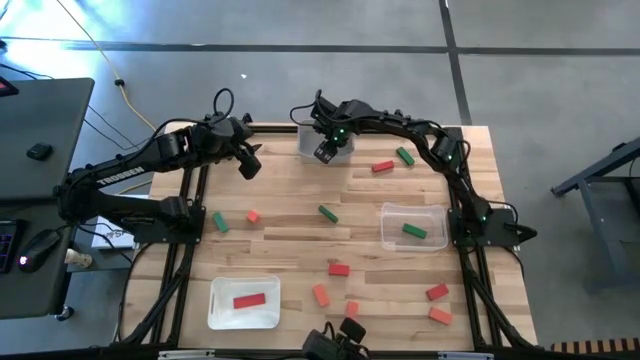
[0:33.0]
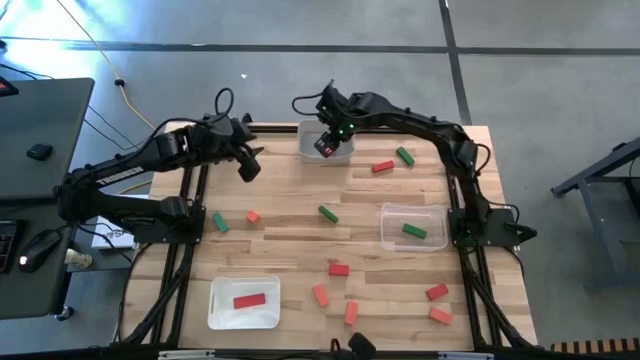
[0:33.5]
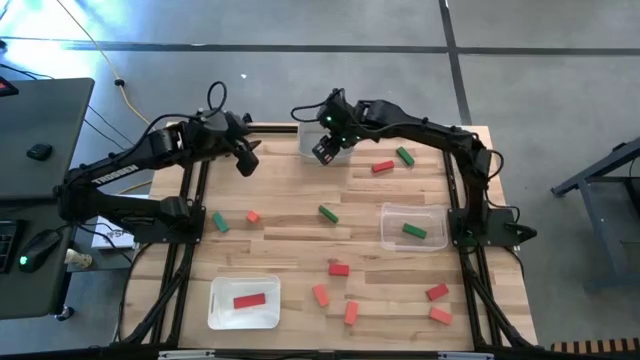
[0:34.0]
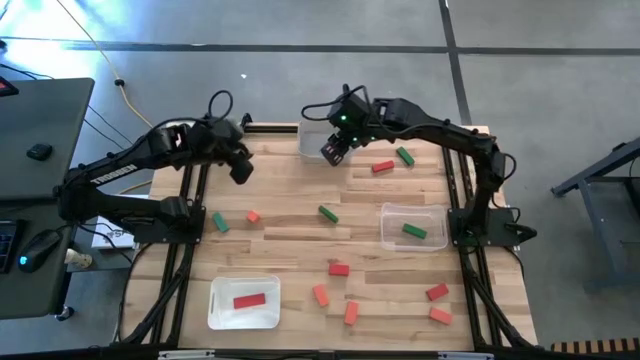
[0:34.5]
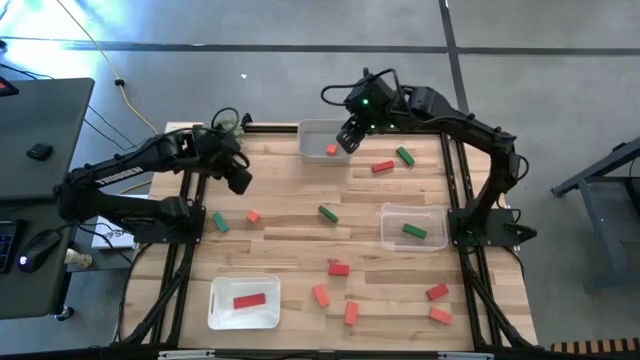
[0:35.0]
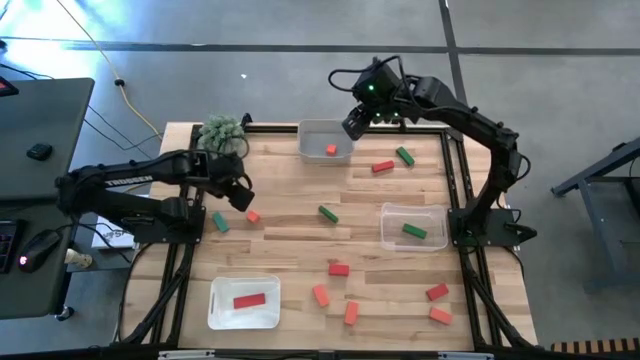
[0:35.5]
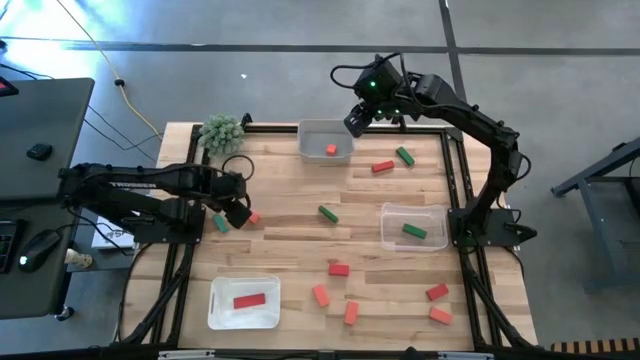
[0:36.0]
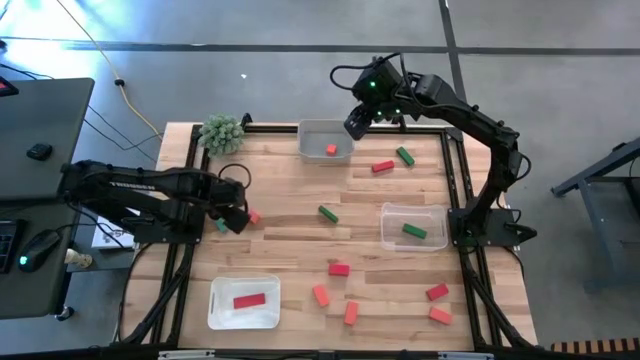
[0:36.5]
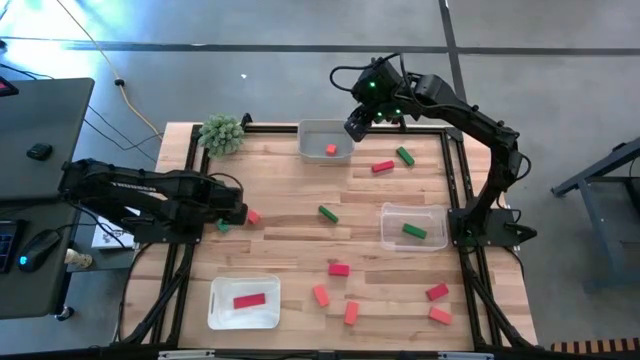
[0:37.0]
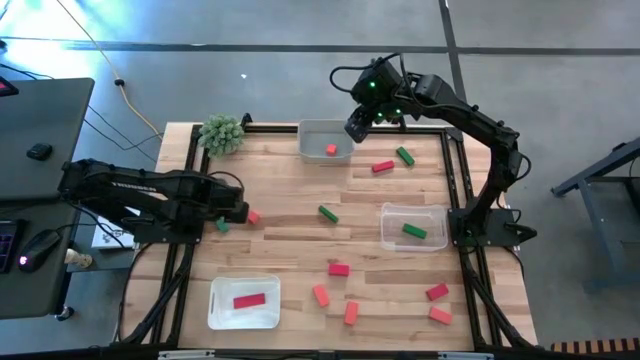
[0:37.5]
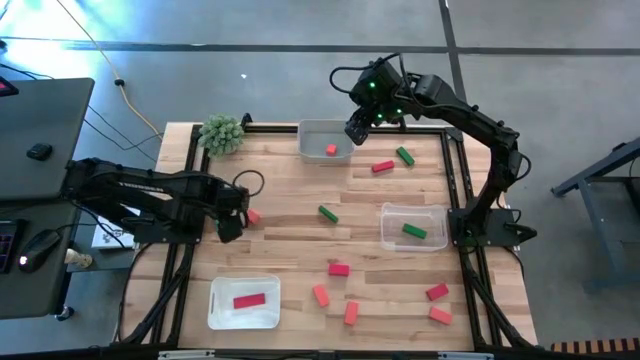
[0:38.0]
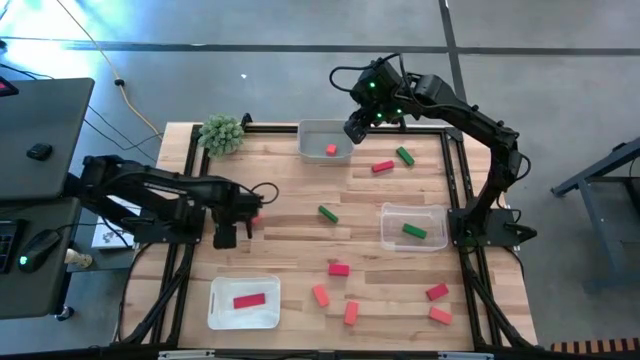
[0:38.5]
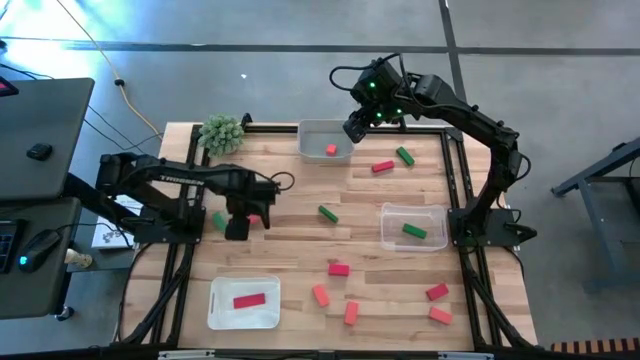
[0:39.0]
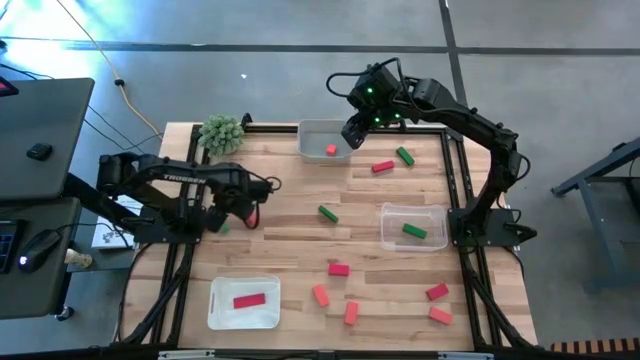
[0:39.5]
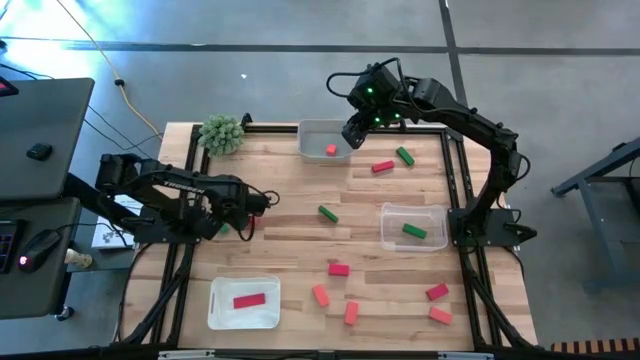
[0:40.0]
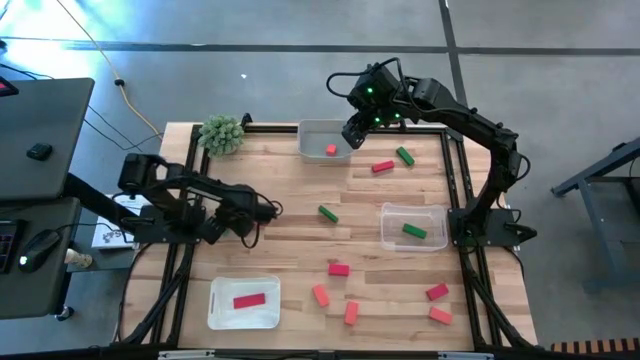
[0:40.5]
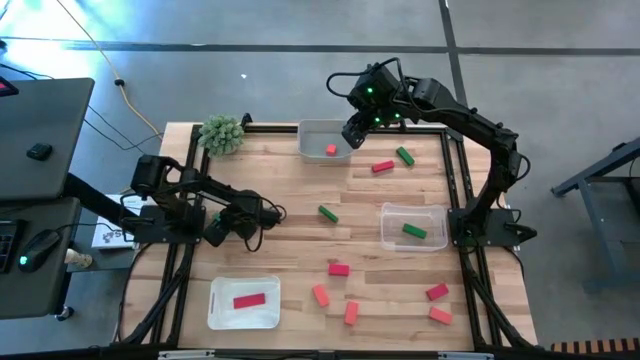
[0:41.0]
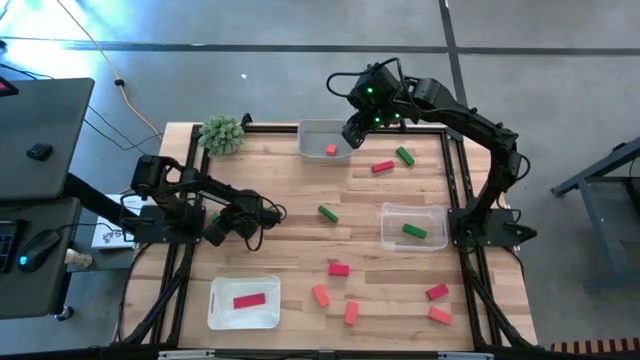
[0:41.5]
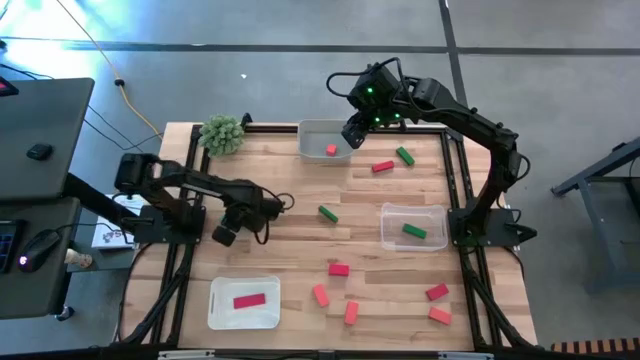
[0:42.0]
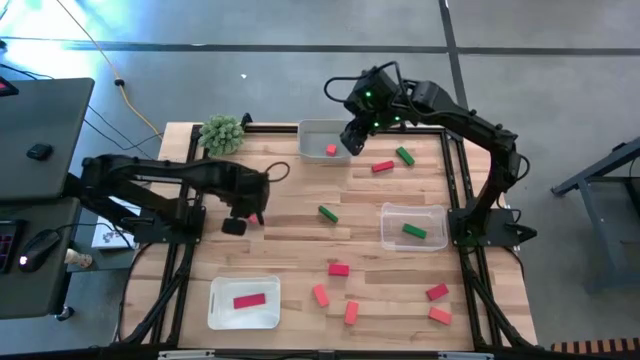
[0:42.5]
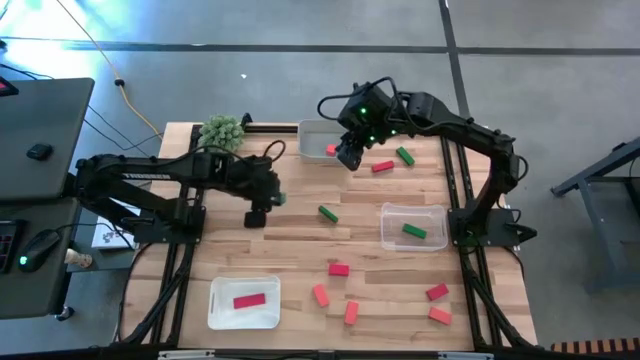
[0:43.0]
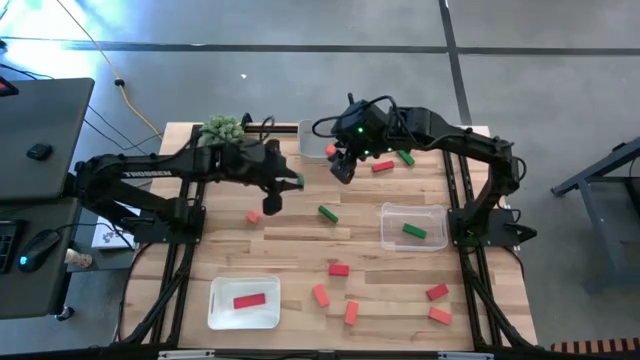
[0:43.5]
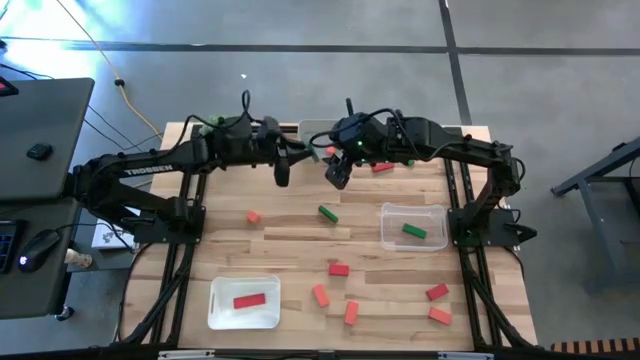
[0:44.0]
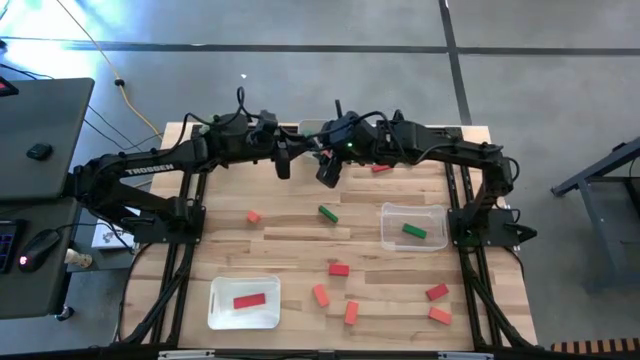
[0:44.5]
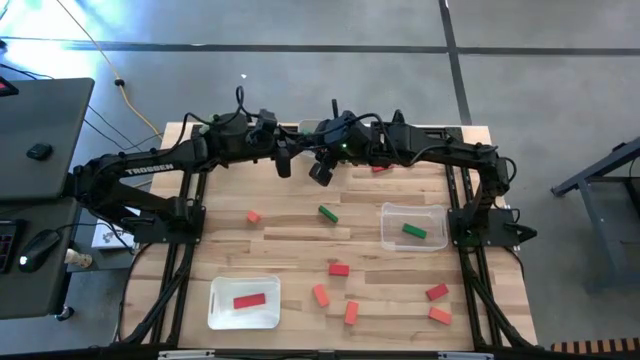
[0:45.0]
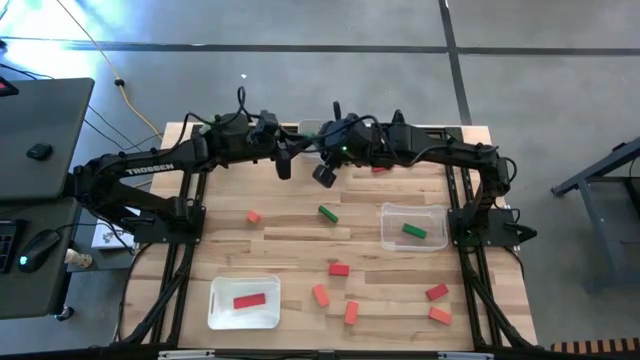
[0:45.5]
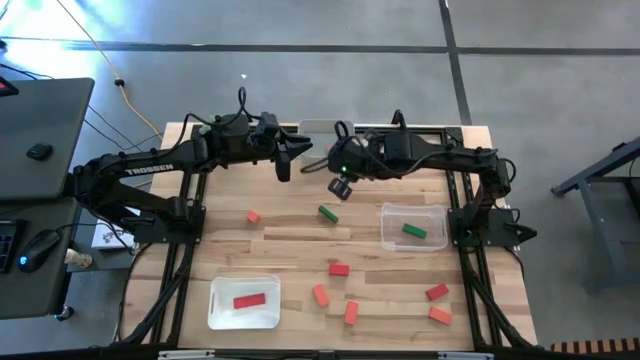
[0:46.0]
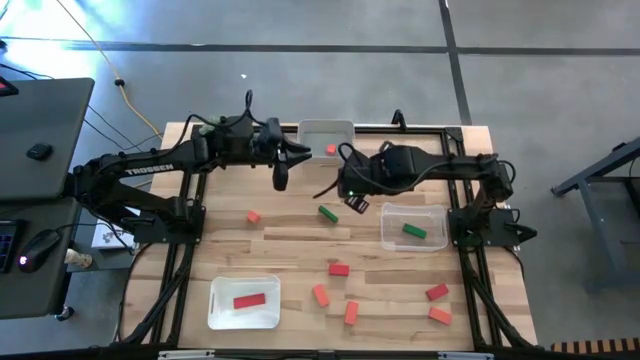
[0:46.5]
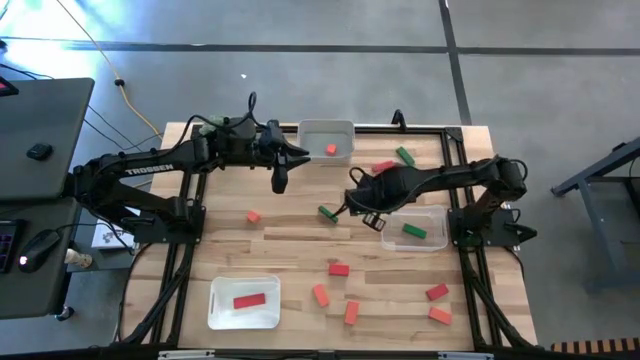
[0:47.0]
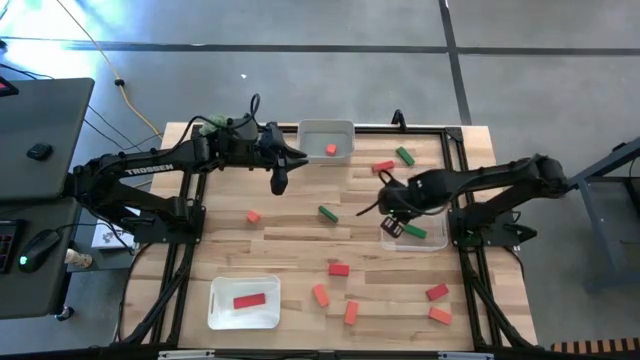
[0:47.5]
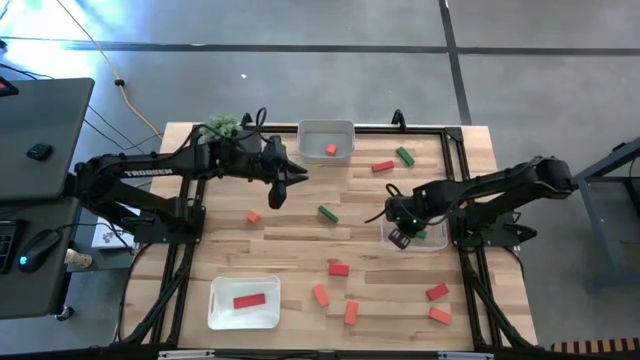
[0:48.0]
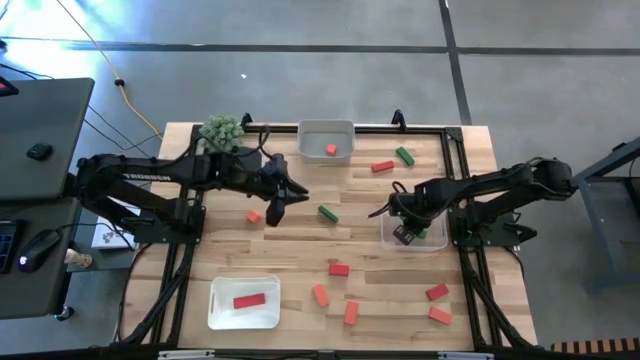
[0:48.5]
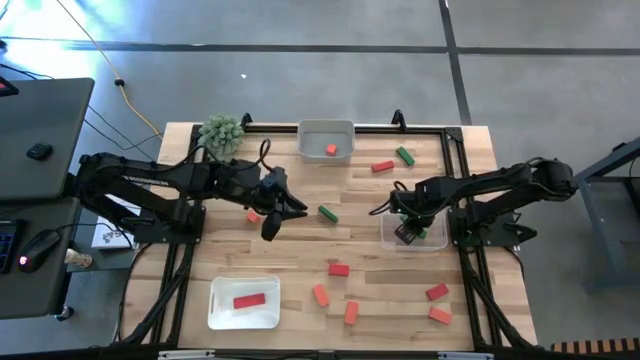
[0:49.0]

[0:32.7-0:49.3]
Task: Sort & place blocks by color
Put the light green wooden block into the transparent bin

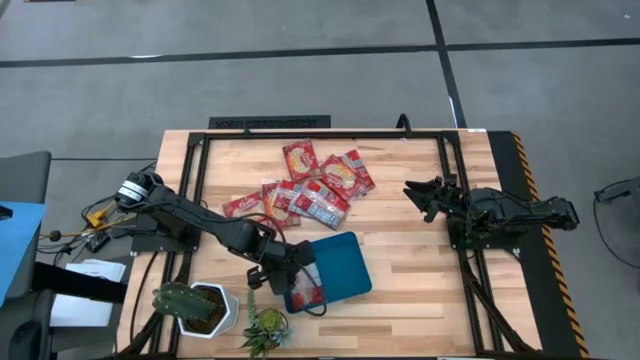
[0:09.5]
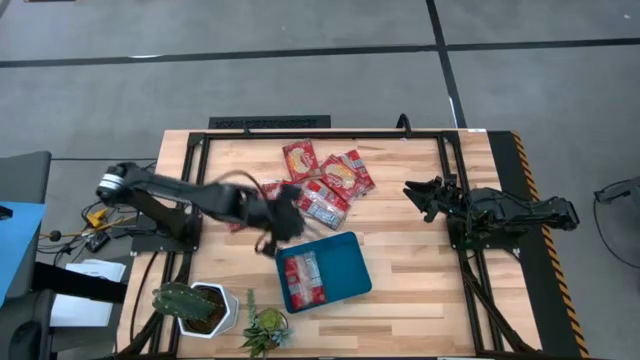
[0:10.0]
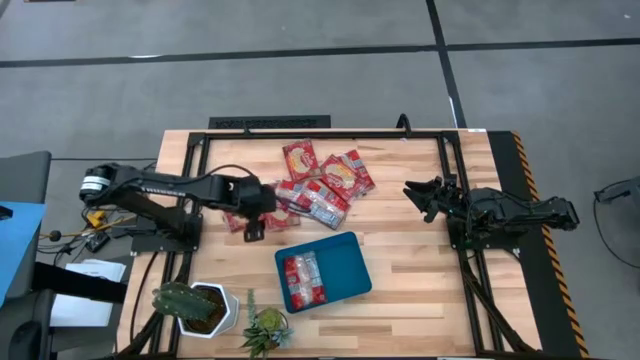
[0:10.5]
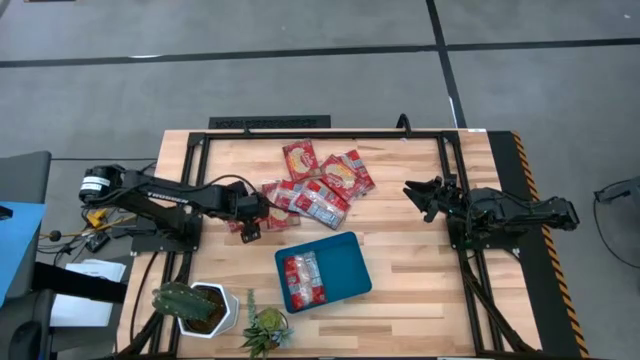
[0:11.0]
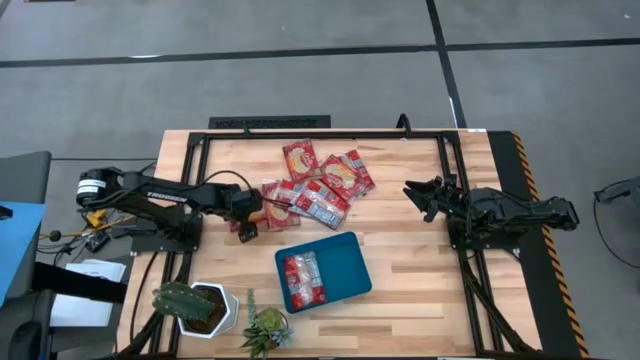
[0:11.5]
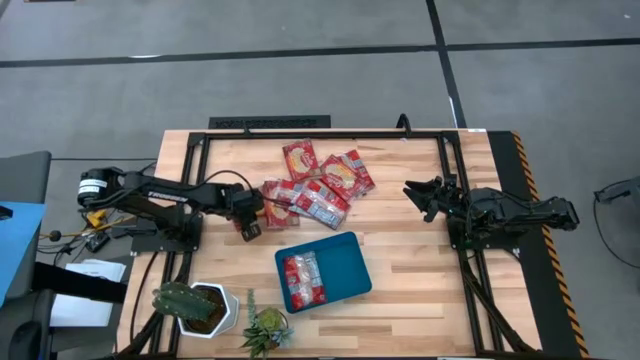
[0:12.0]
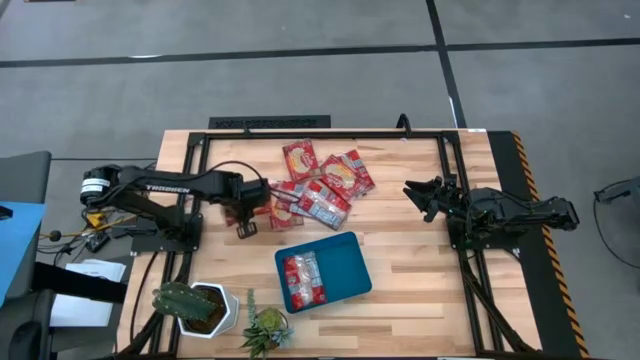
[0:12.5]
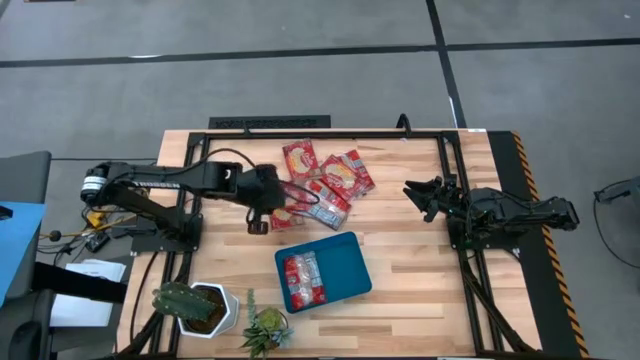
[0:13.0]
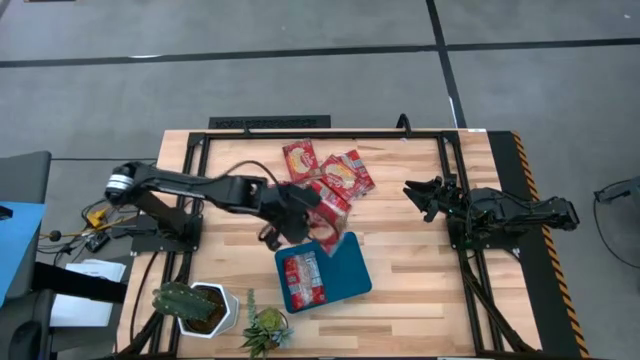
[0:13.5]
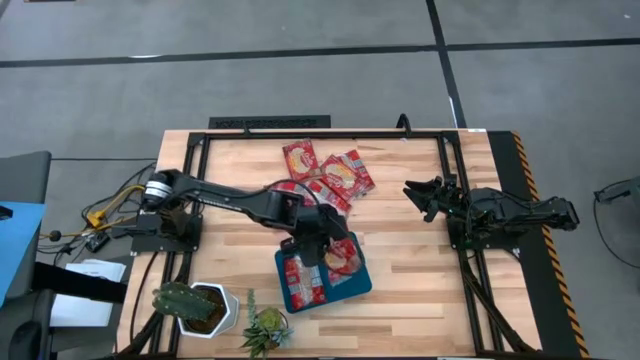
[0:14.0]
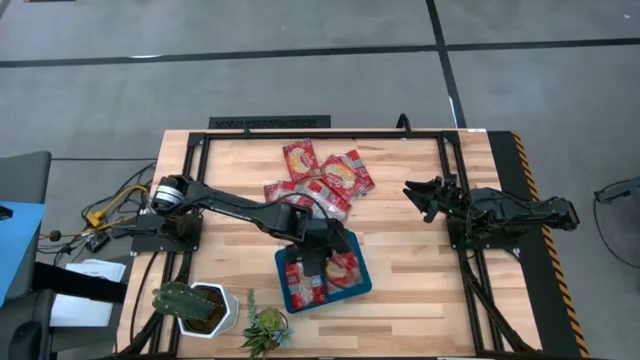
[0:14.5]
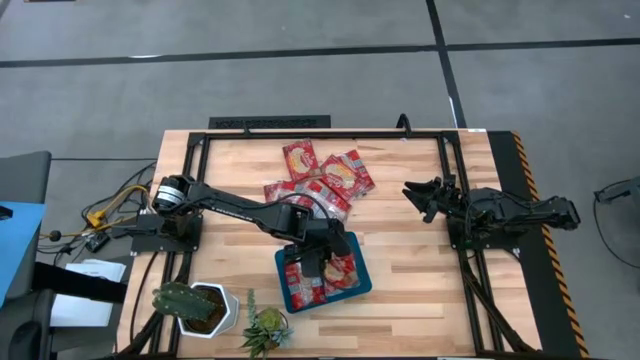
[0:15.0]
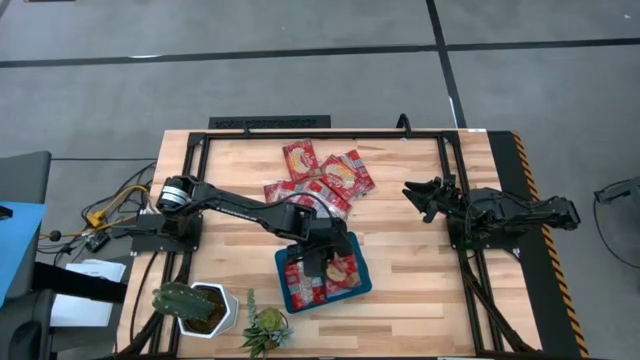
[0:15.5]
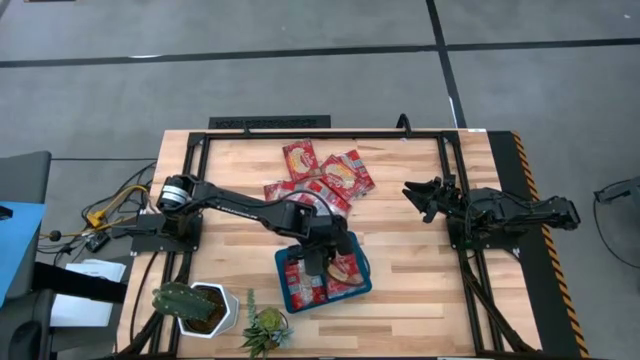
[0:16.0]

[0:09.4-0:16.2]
Task: Sort popcorn bags into baskets
Put the popcorn bag into the blue bin
